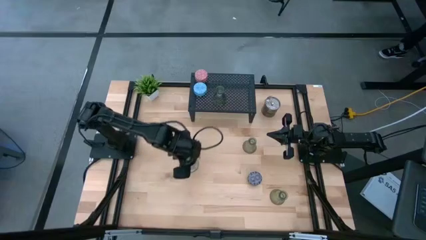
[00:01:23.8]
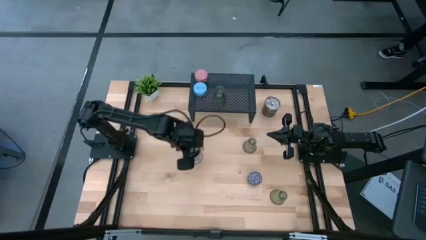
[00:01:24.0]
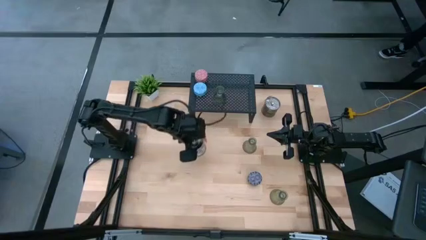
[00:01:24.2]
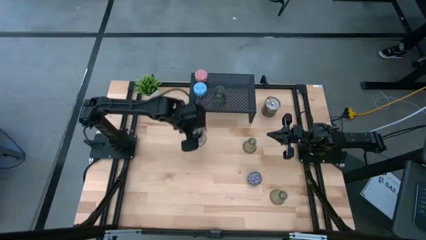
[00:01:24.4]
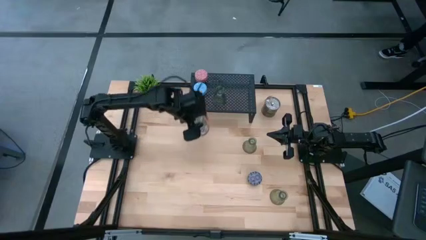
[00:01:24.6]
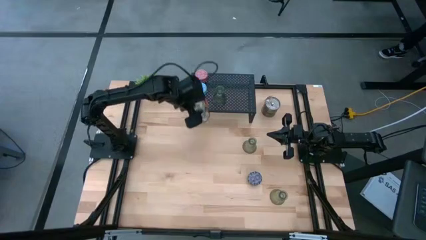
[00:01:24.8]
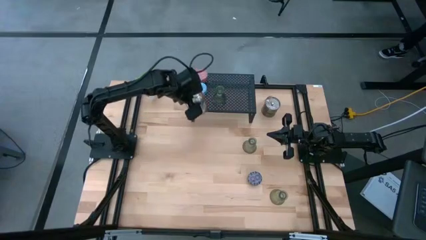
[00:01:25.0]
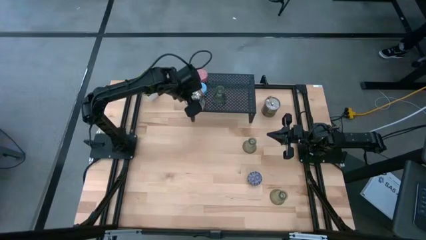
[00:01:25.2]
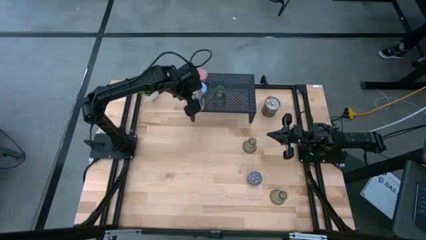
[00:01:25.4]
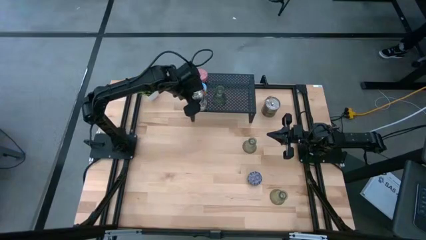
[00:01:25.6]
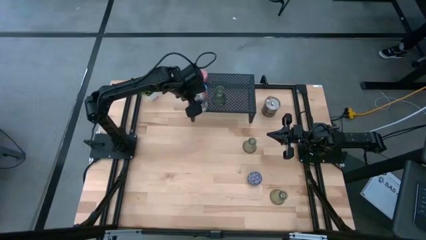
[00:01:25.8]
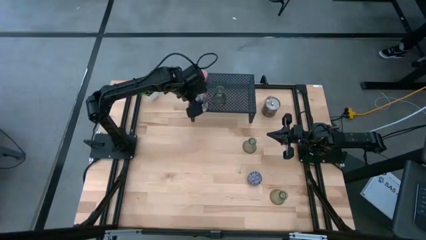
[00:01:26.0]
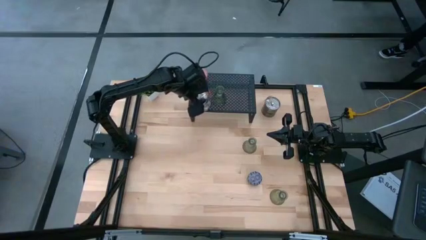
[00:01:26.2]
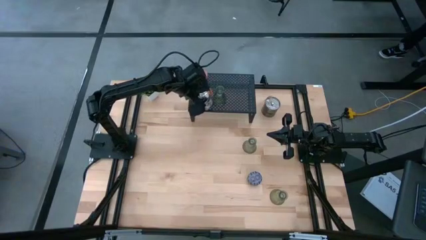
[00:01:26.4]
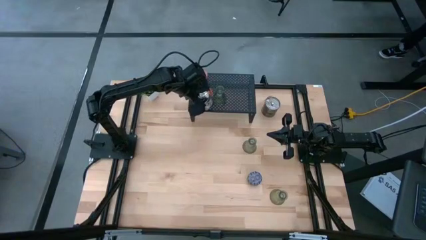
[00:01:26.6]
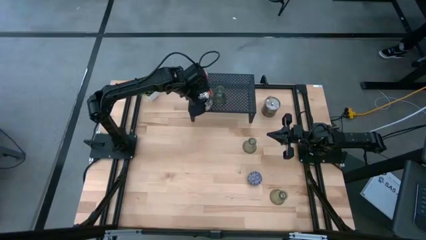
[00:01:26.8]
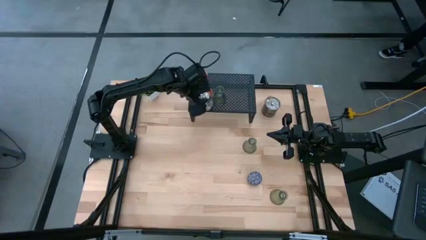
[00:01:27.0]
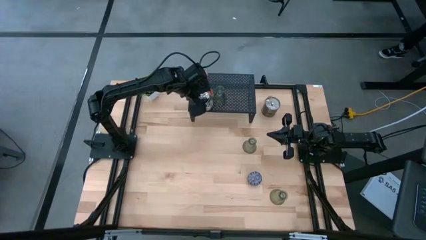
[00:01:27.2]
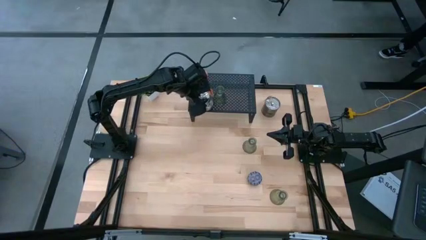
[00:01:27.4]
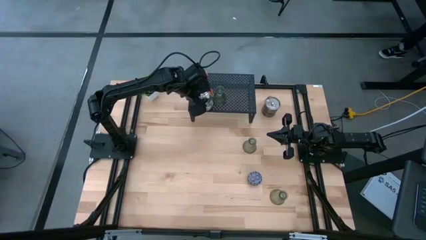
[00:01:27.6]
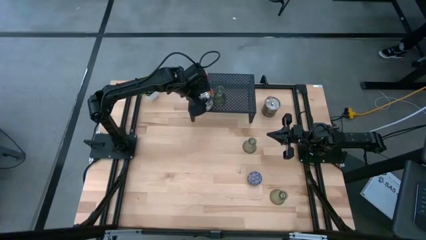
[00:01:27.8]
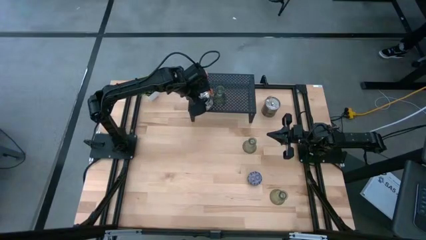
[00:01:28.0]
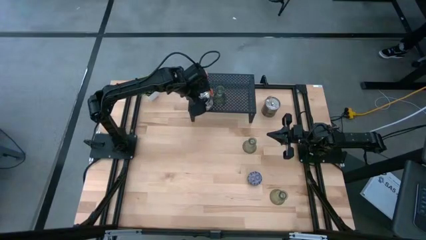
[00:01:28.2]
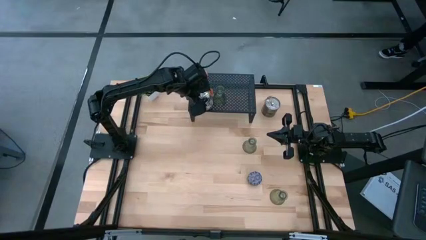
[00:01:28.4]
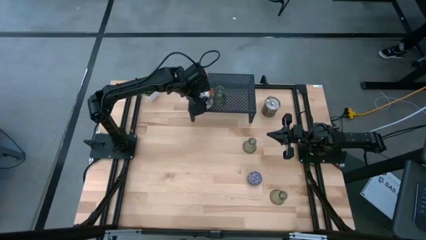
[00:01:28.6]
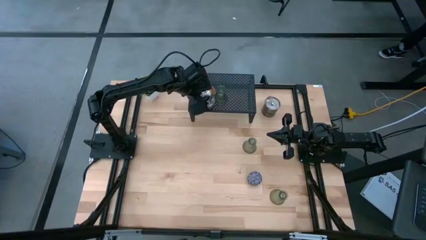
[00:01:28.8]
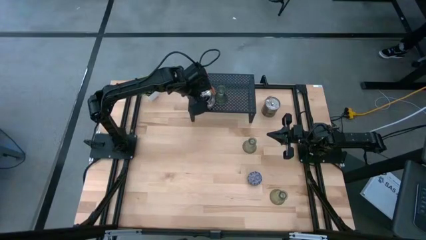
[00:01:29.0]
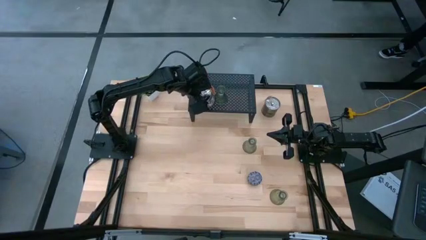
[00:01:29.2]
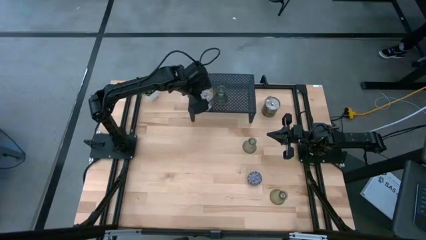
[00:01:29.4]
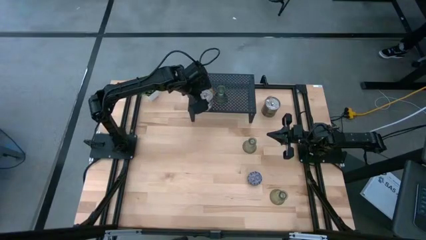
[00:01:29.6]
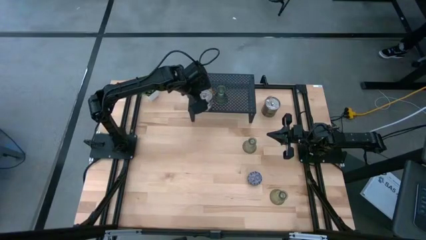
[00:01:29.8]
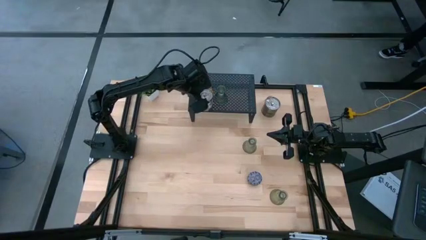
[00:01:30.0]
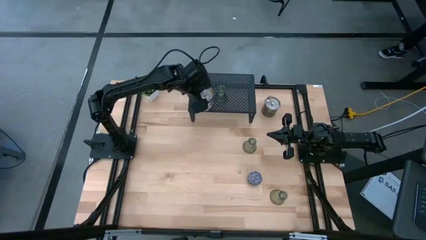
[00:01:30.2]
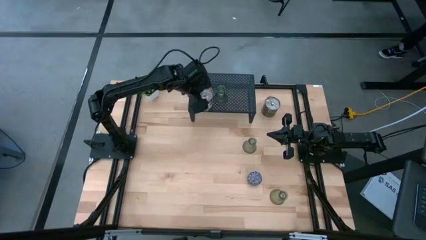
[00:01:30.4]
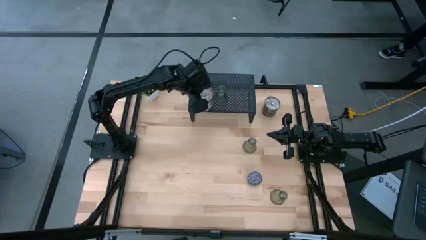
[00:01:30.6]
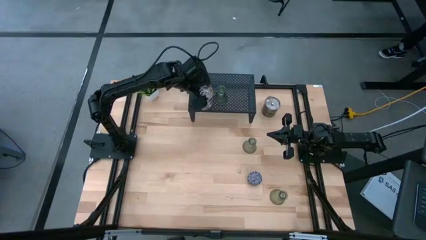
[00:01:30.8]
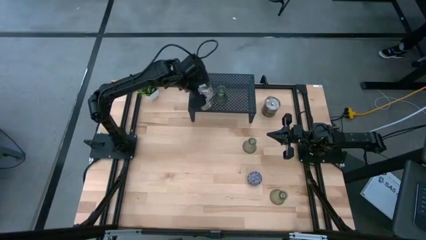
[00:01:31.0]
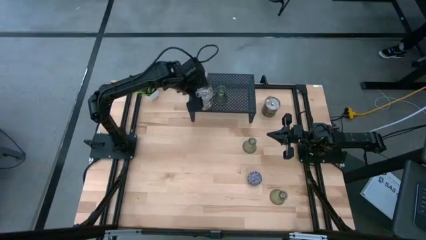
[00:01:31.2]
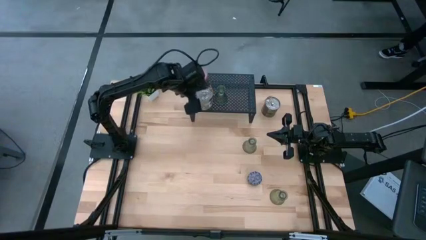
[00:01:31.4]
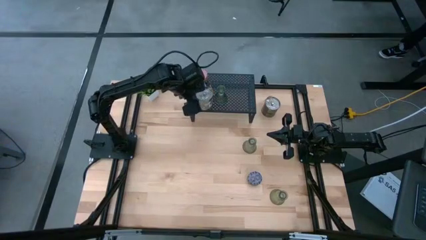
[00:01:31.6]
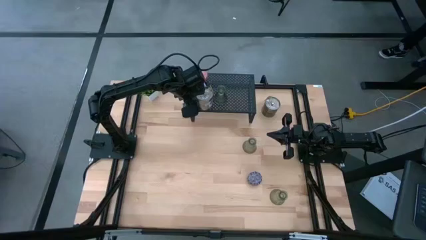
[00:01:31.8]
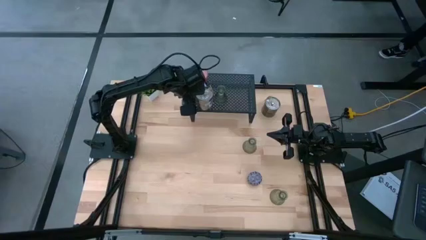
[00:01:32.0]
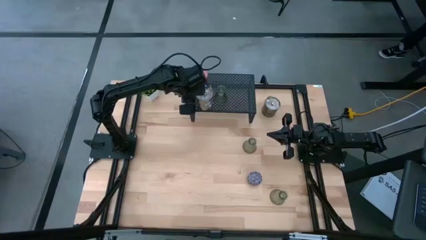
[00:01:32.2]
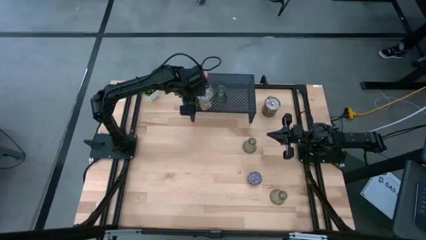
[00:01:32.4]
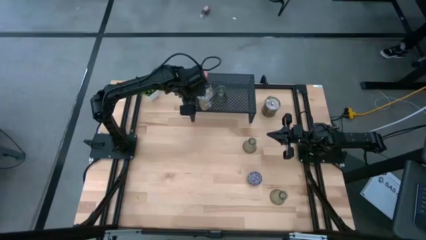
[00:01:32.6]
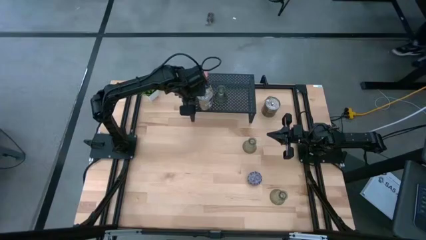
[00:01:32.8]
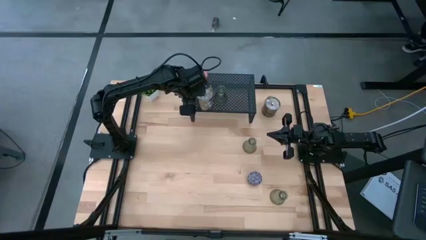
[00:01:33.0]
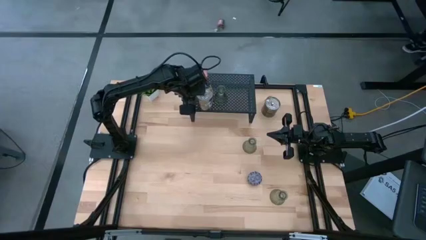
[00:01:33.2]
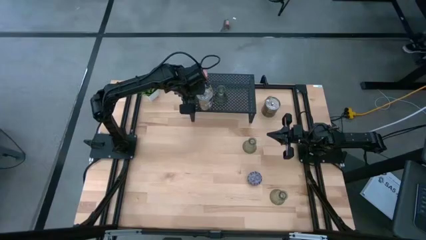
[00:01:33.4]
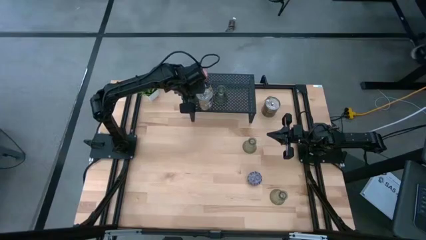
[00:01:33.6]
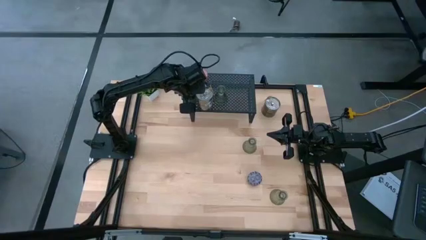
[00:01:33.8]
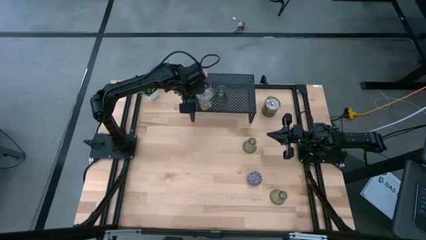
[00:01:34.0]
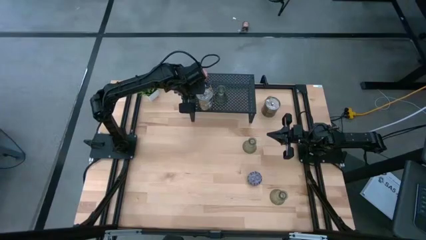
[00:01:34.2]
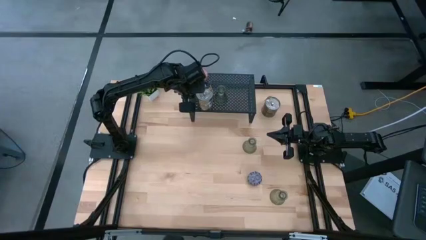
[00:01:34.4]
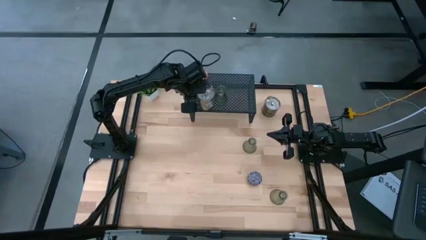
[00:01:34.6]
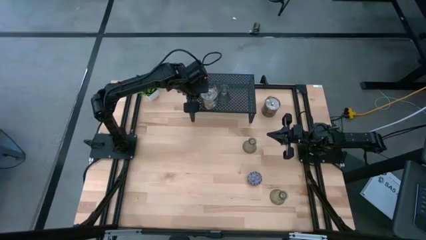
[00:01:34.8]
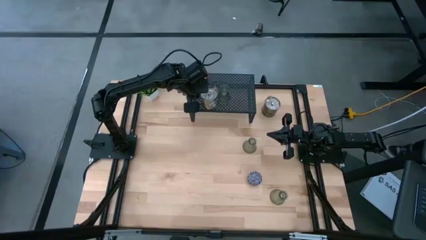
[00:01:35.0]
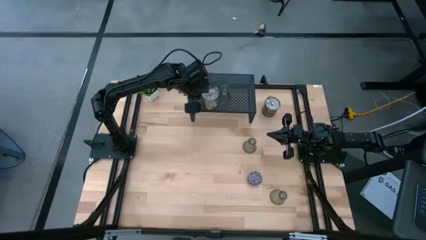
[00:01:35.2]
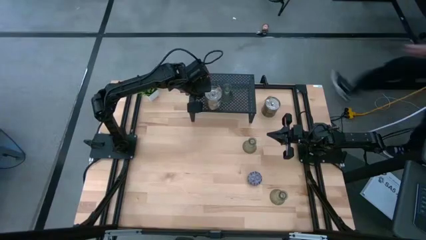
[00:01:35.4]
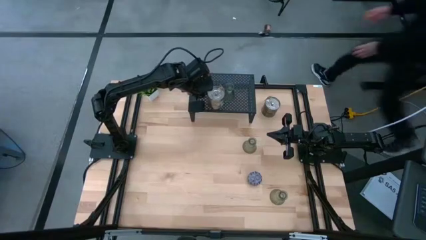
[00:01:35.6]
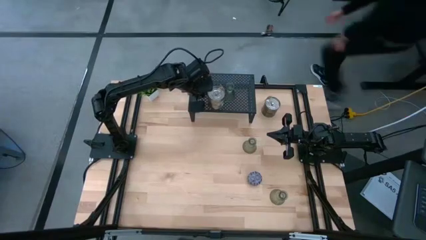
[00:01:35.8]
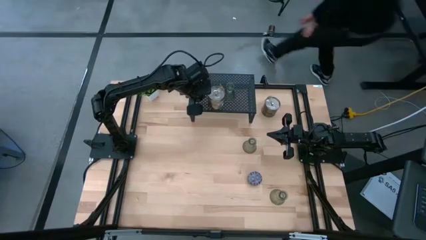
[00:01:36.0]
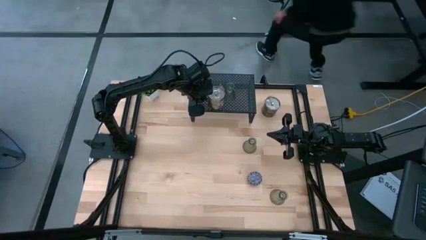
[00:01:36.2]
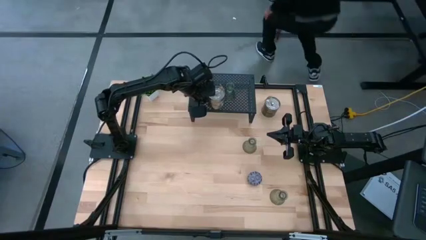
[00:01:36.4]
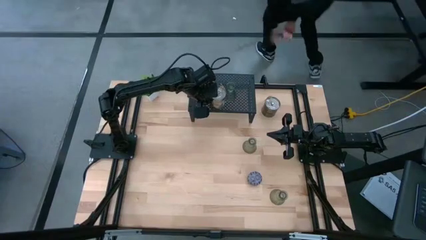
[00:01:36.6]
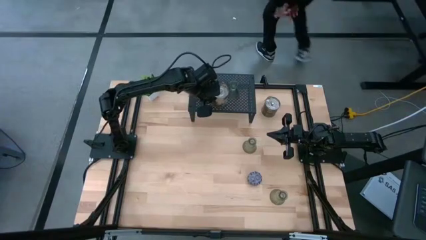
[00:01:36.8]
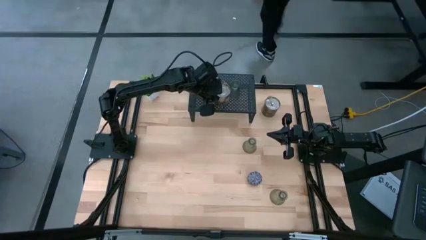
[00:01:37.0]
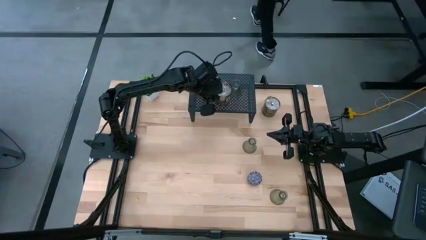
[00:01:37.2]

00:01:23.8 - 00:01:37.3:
Task: Pick & Place candle stick holders
Put the bottom silver scented candle on the shelf
